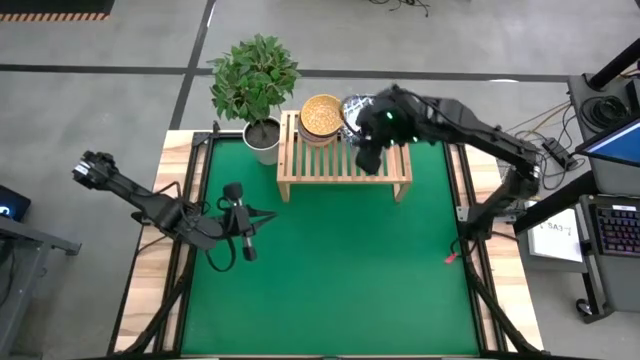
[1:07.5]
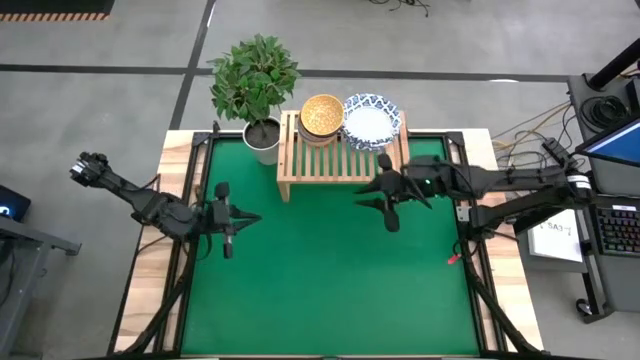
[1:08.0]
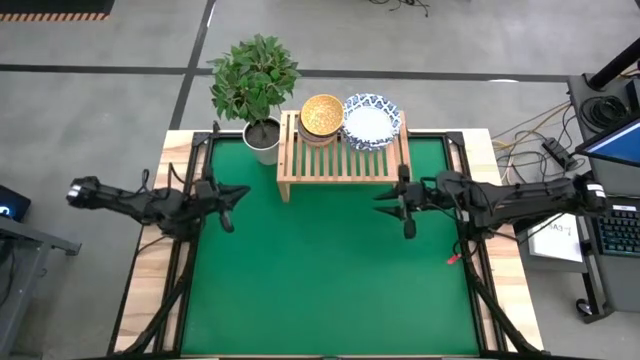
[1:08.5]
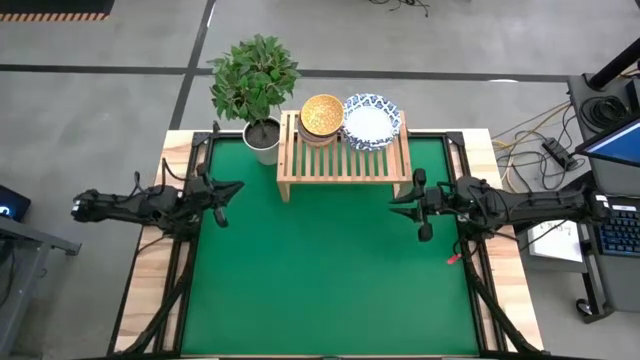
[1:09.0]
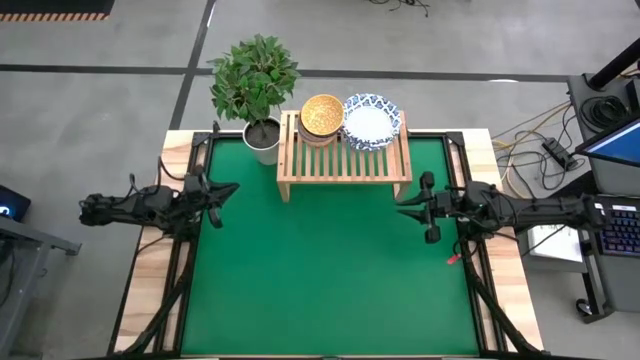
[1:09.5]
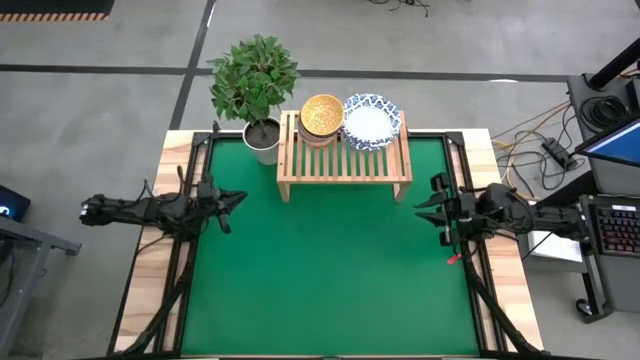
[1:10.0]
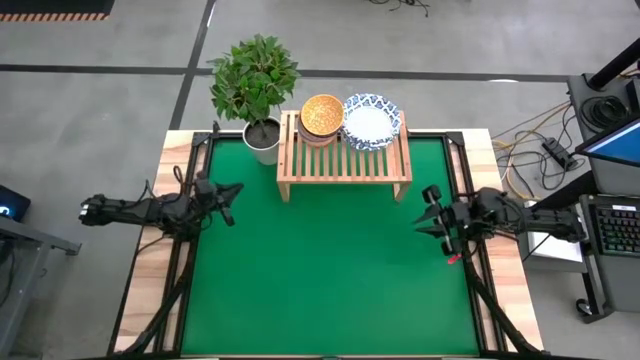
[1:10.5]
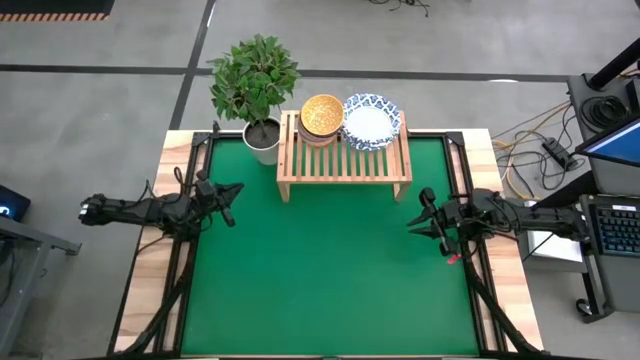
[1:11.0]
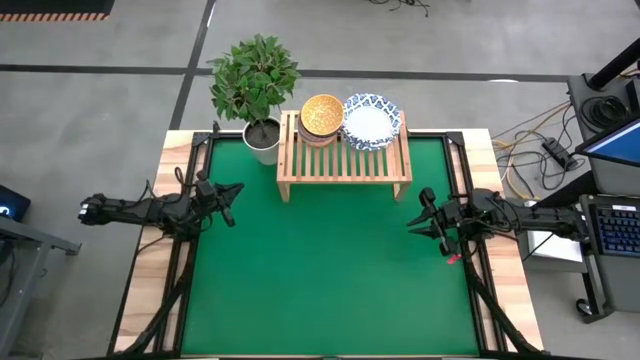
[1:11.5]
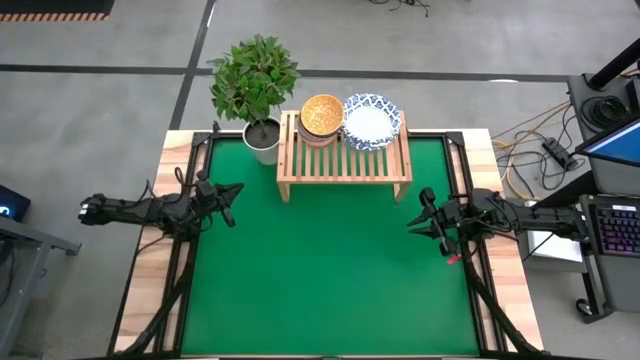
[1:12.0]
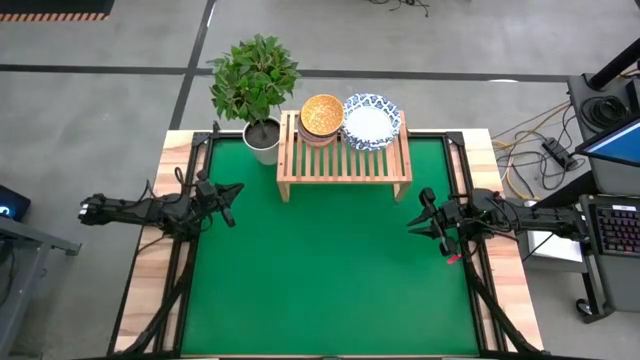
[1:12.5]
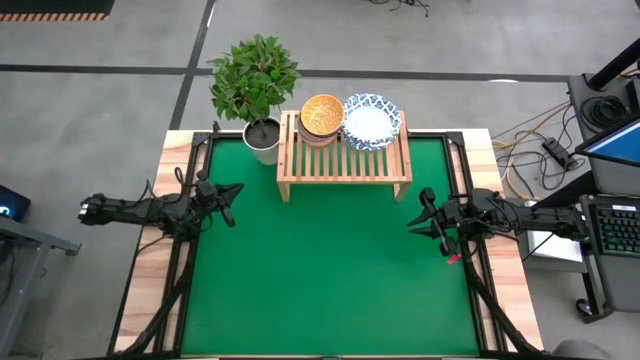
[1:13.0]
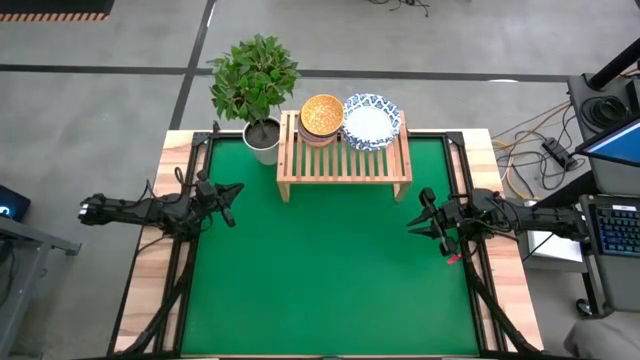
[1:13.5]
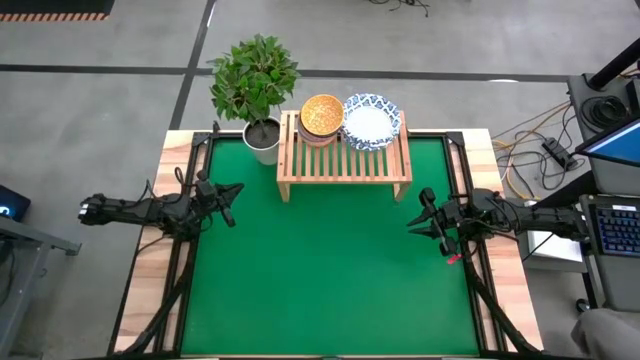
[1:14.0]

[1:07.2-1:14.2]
Task: Place and stack bowls onto a shelf
Return to home position

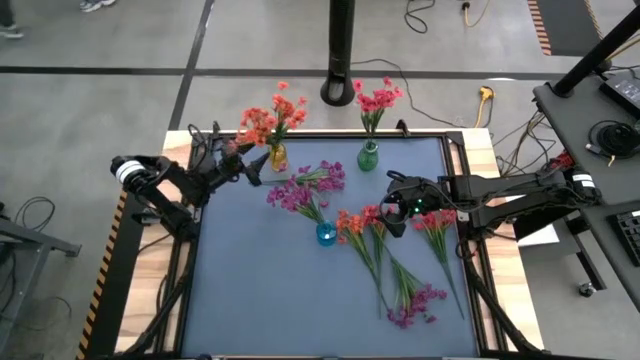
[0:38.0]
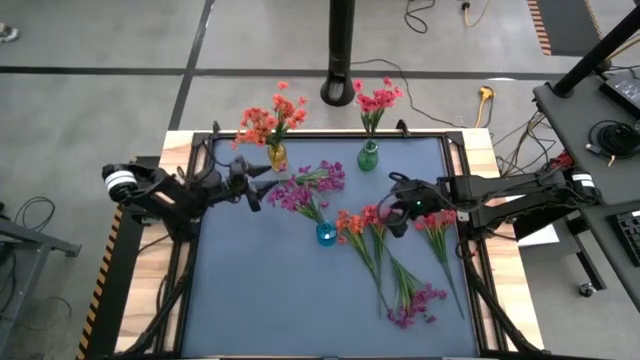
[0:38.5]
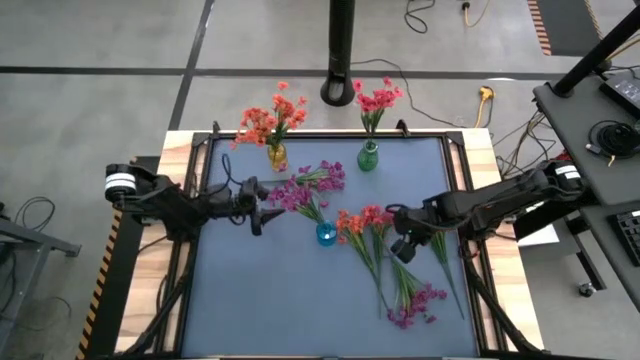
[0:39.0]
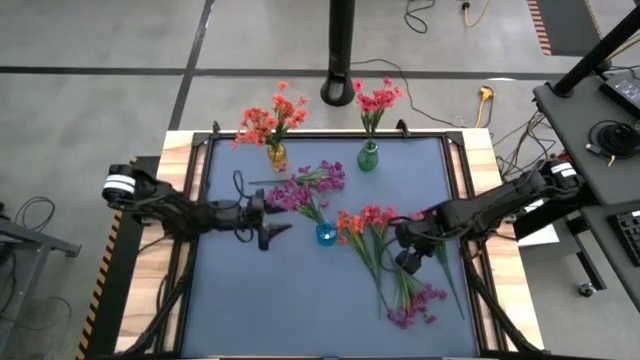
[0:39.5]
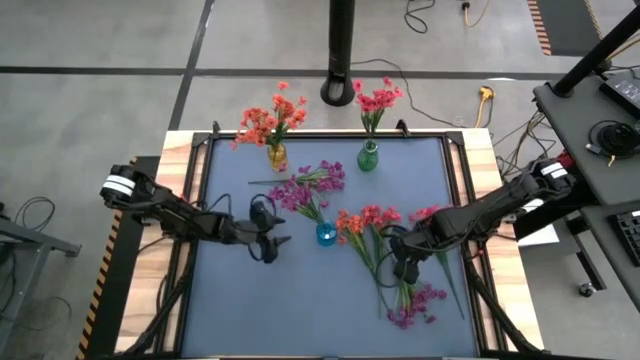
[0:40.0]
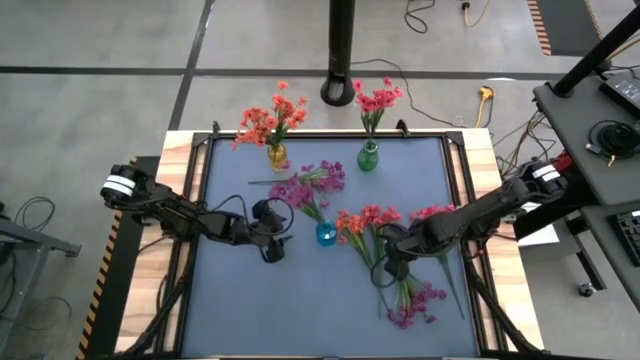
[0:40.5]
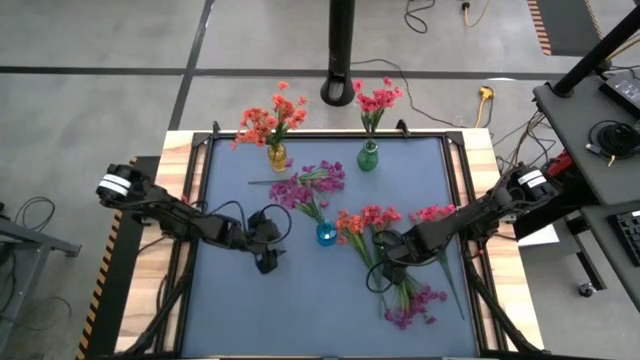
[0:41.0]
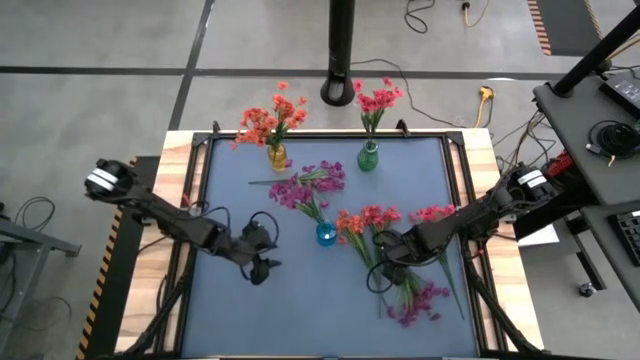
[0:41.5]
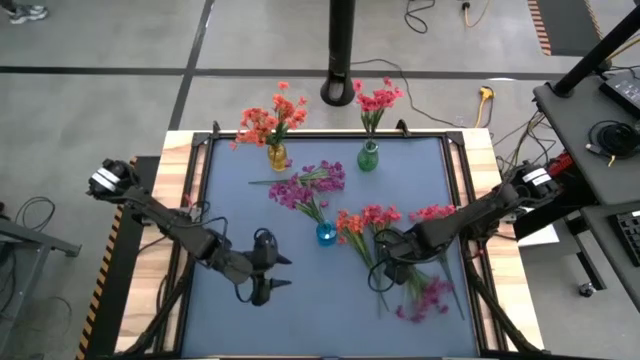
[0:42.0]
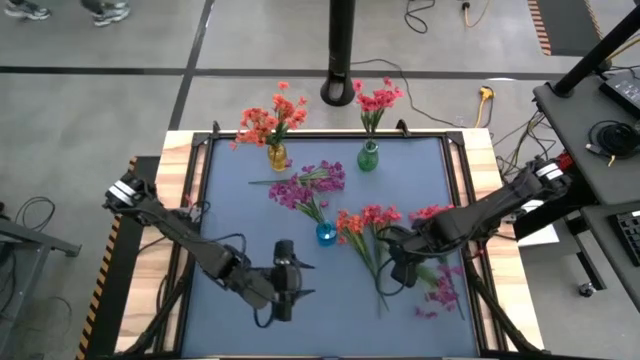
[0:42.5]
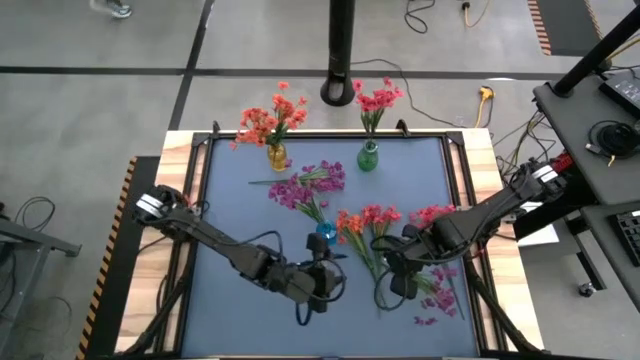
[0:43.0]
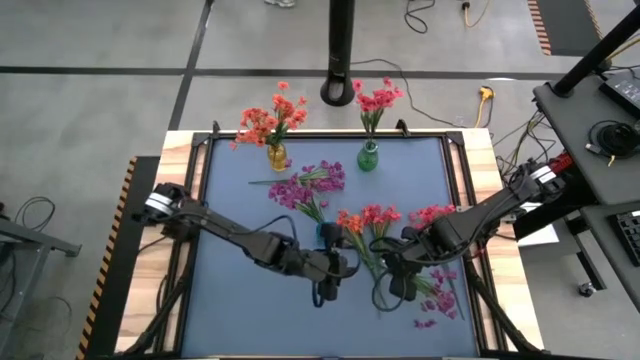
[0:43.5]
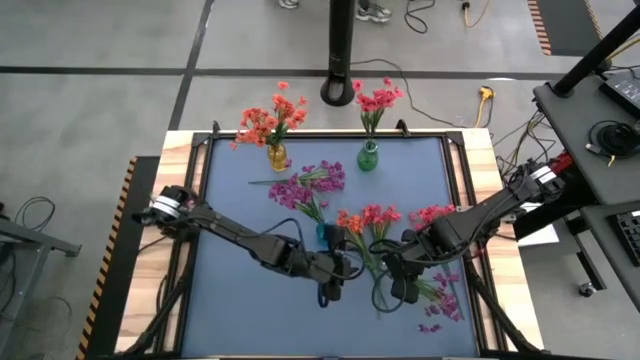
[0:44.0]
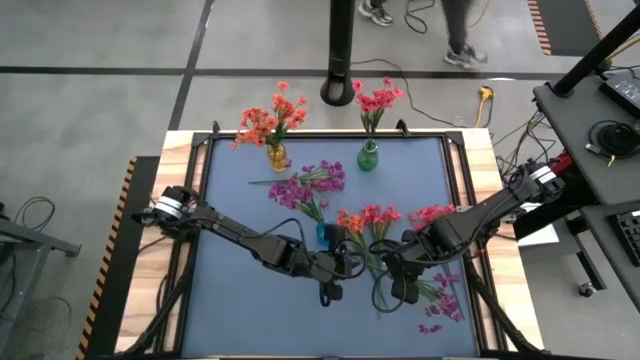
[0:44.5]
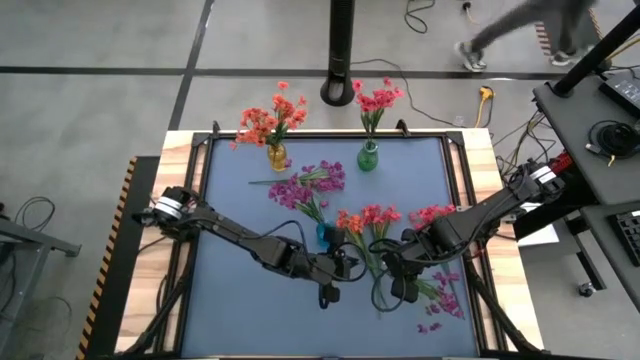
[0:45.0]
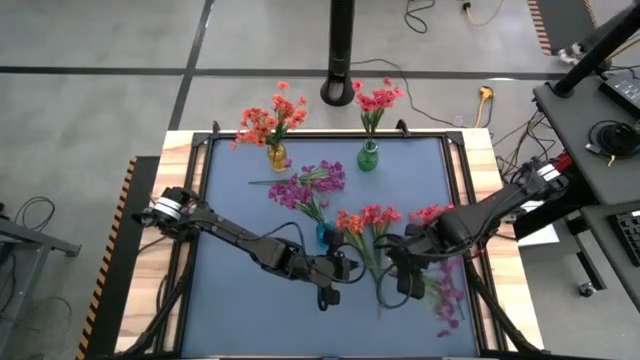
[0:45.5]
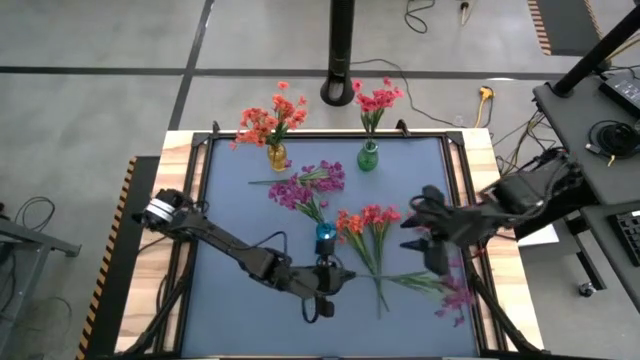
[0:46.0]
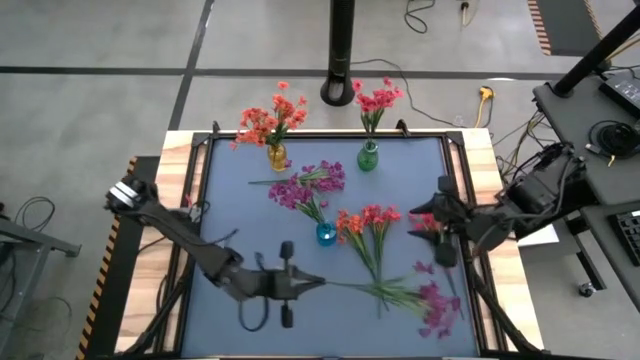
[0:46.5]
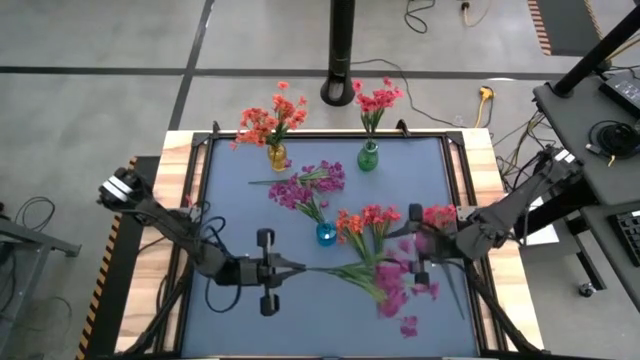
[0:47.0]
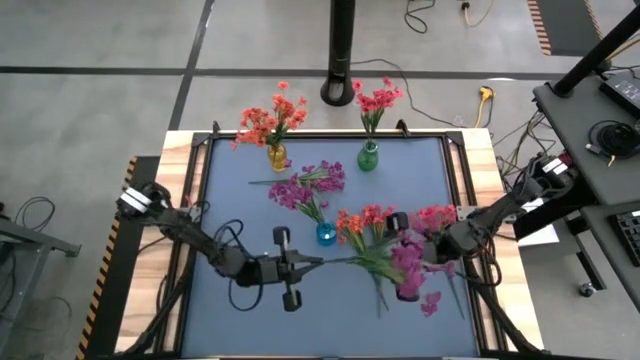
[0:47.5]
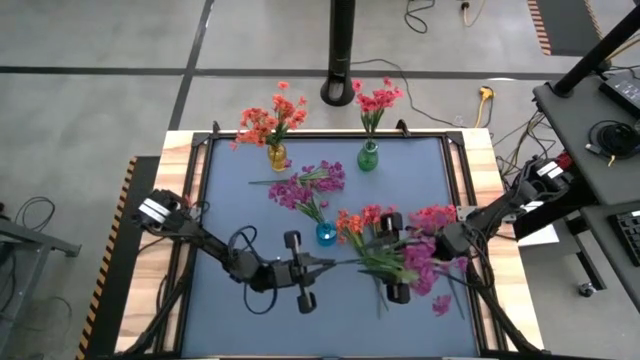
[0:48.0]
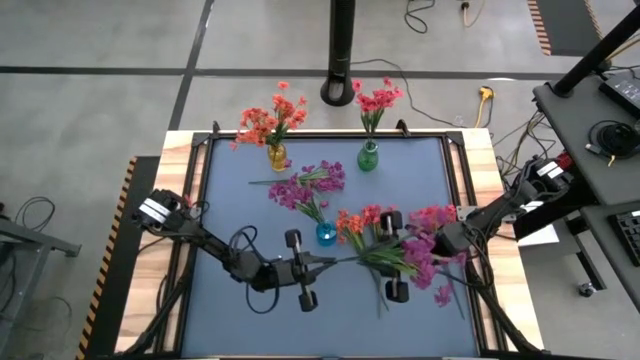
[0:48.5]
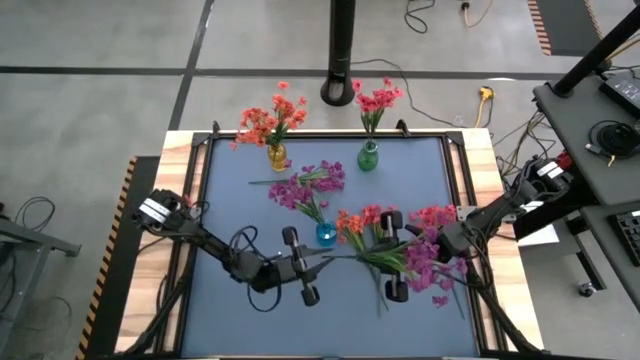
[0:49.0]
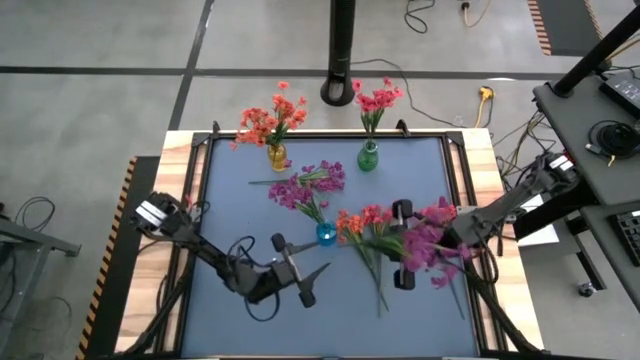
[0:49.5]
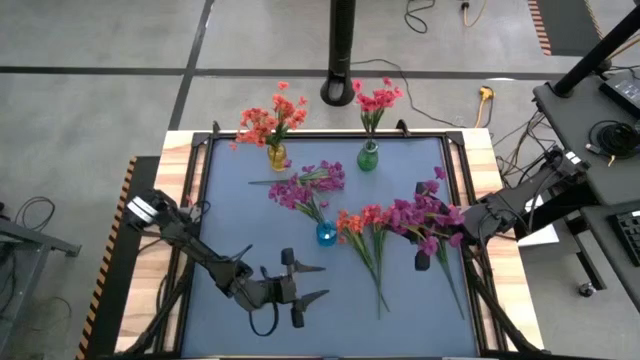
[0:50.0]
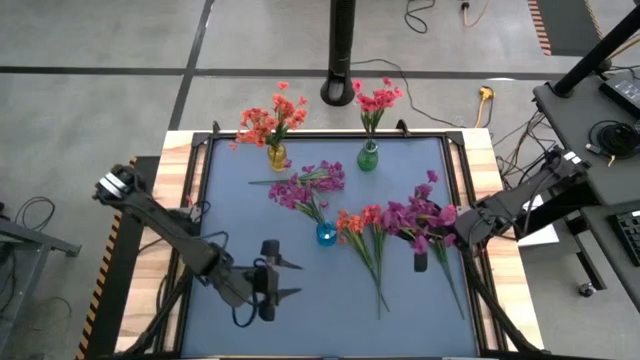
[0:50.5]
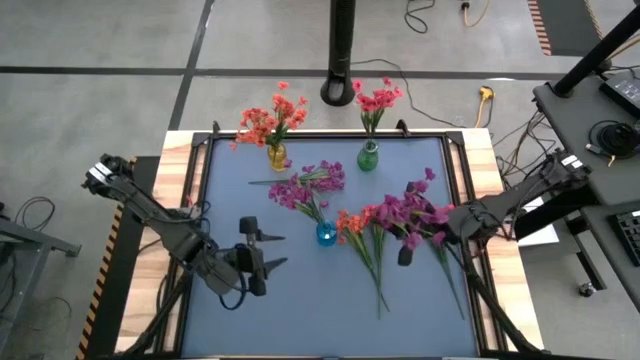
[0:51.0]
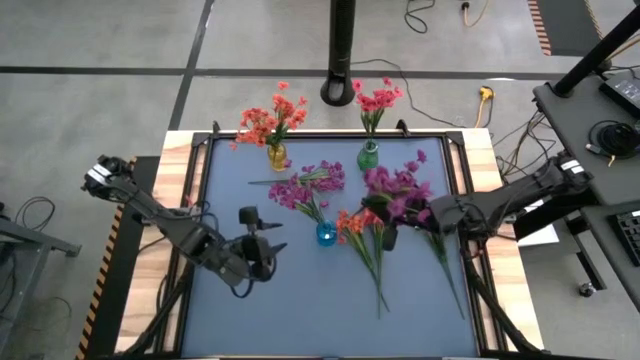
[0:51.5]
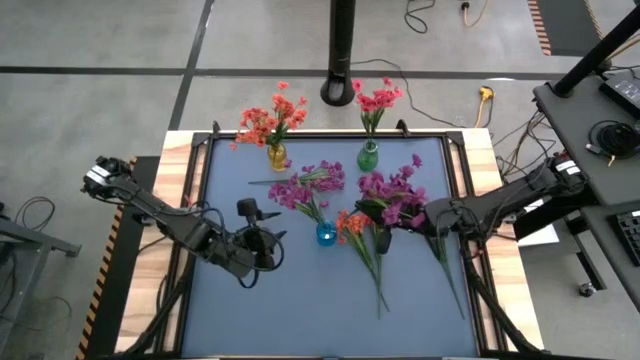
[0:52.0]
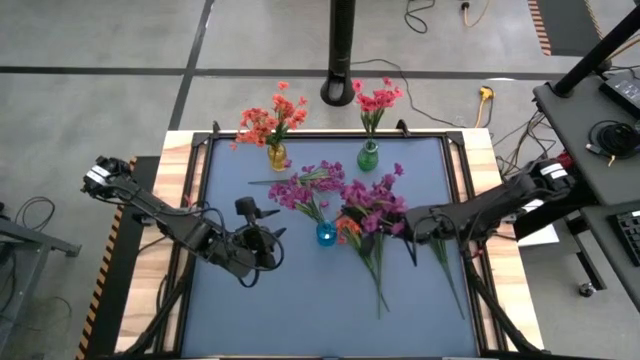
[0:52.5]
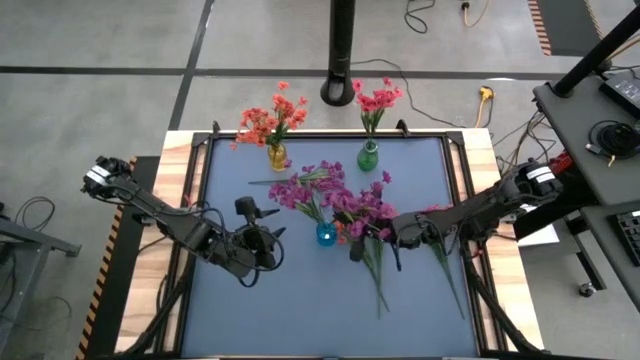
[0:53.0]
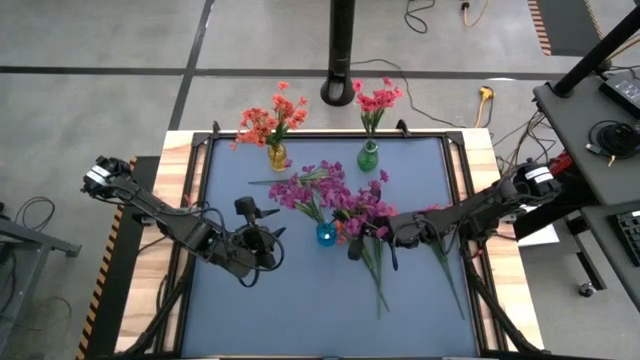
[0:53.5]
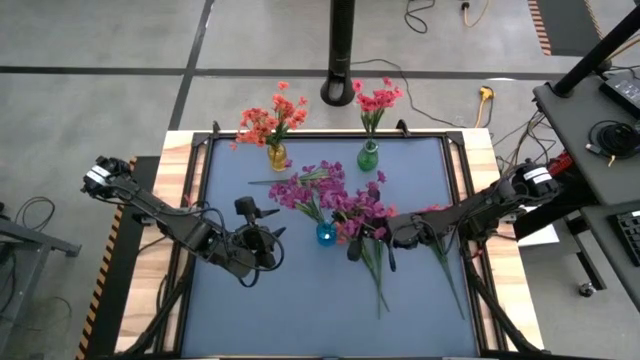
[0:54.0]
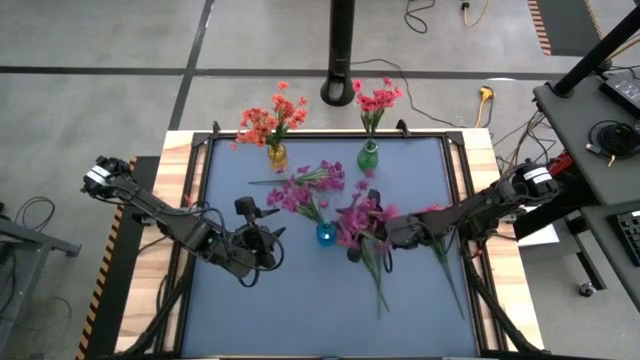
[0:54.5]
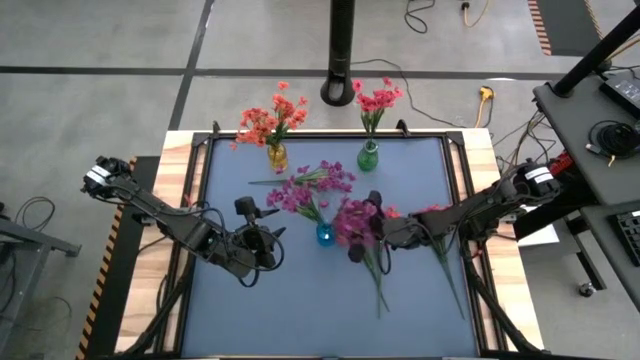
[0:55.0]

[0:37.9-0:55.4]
Task: Sort flowers into vase by color
Put the bottom violet flower into the blue vase
